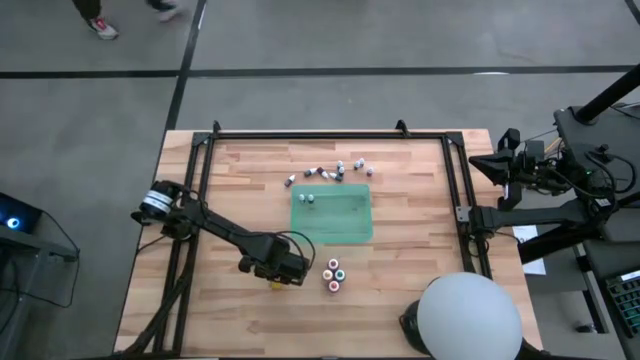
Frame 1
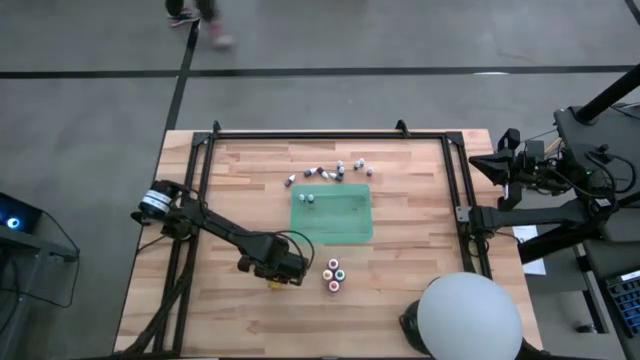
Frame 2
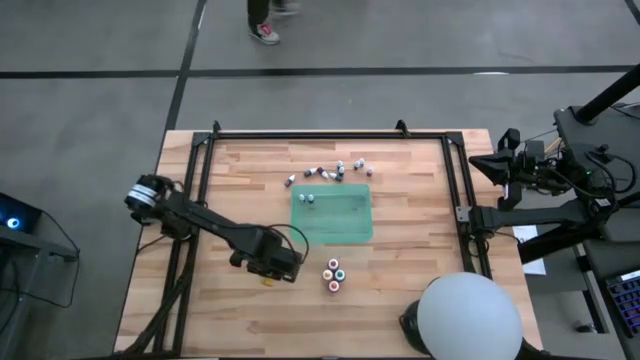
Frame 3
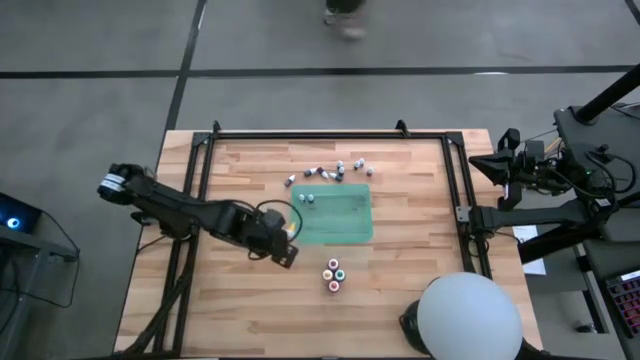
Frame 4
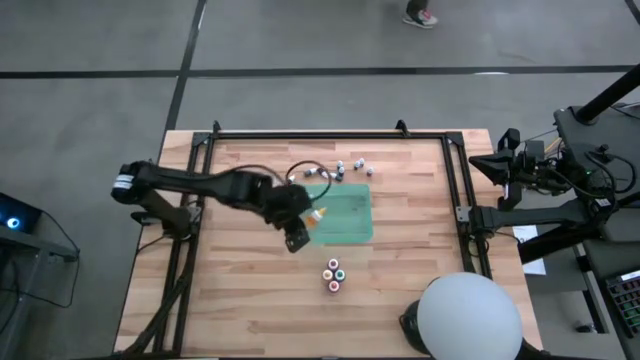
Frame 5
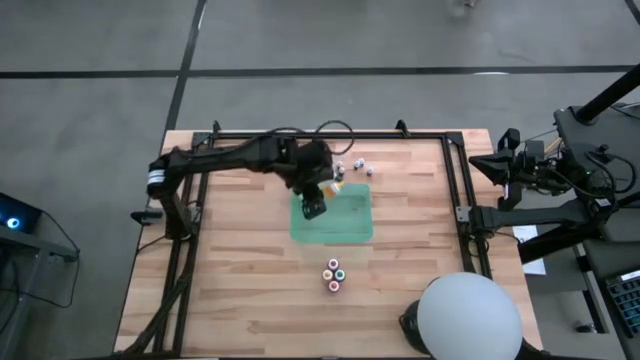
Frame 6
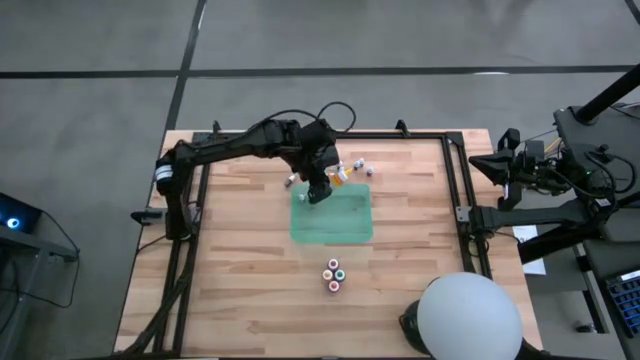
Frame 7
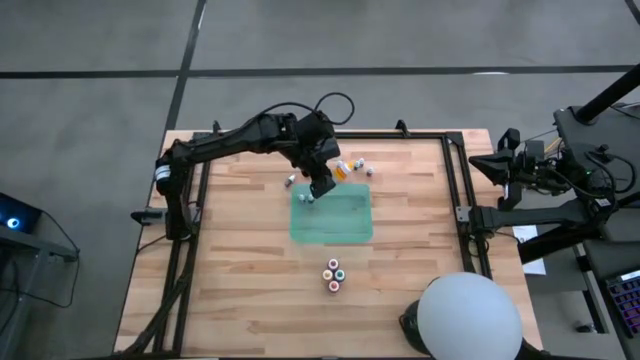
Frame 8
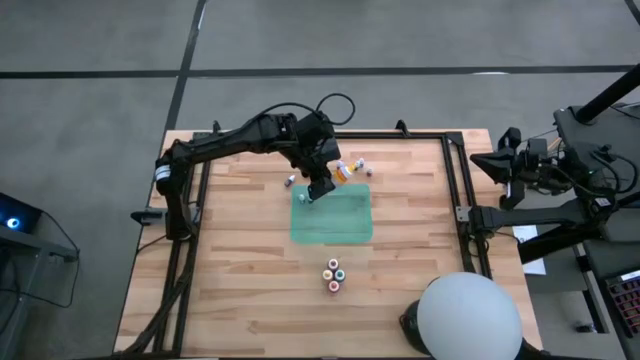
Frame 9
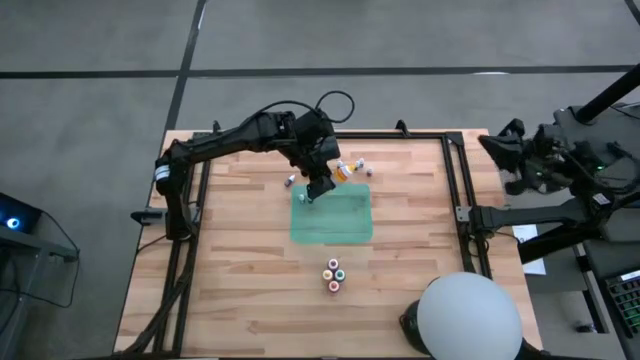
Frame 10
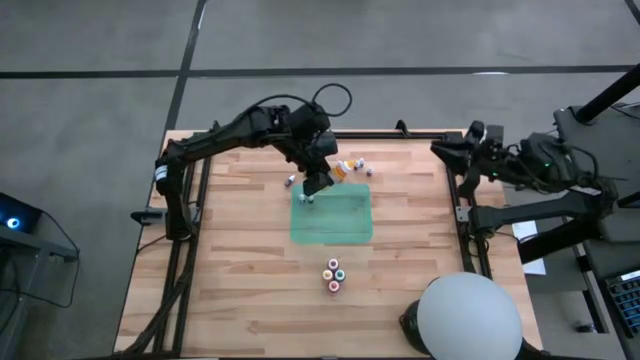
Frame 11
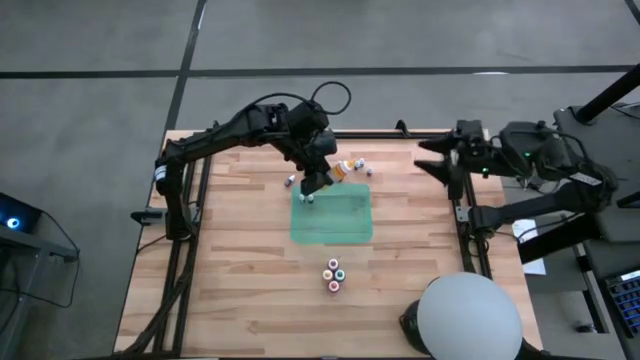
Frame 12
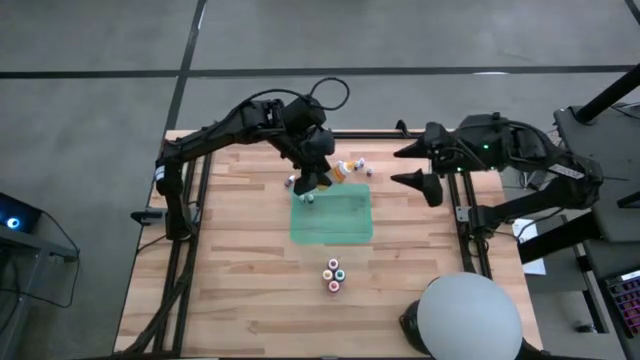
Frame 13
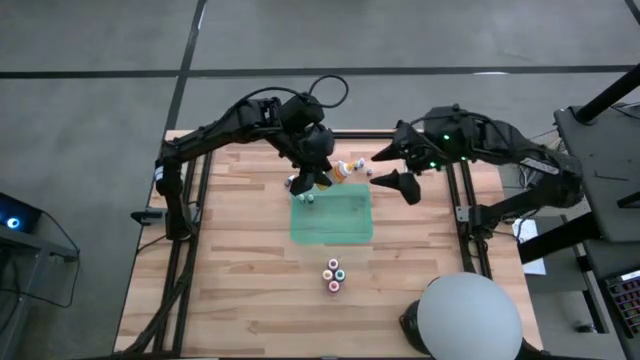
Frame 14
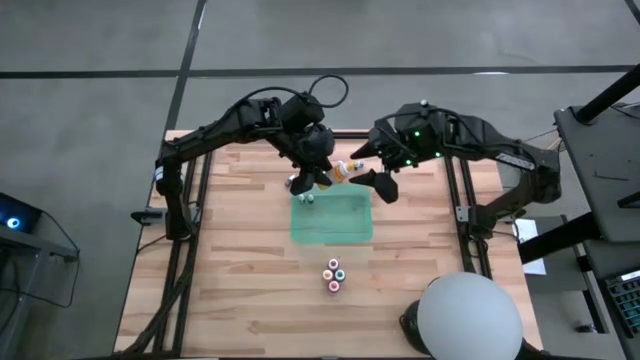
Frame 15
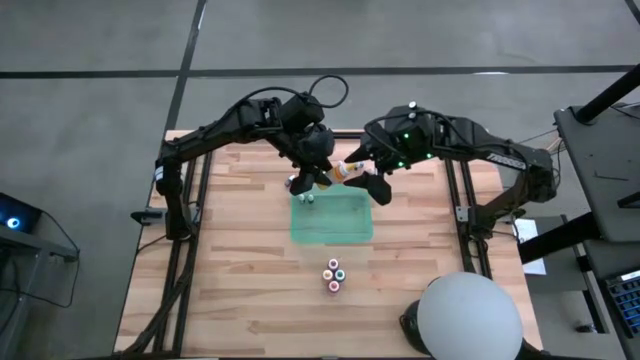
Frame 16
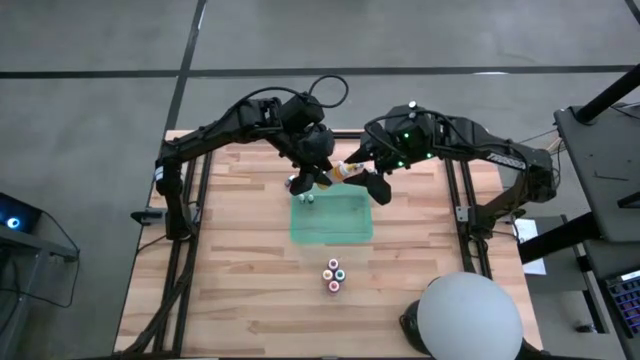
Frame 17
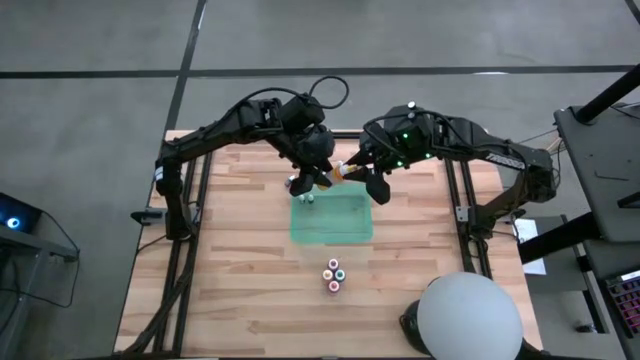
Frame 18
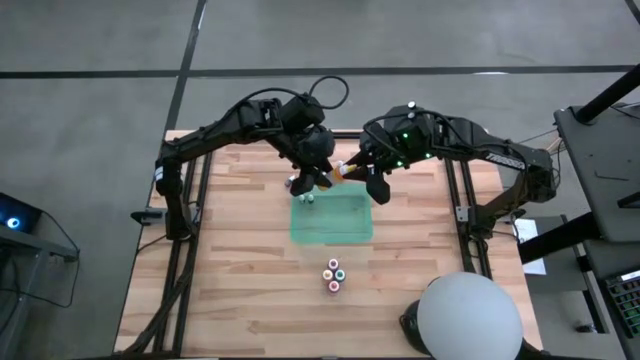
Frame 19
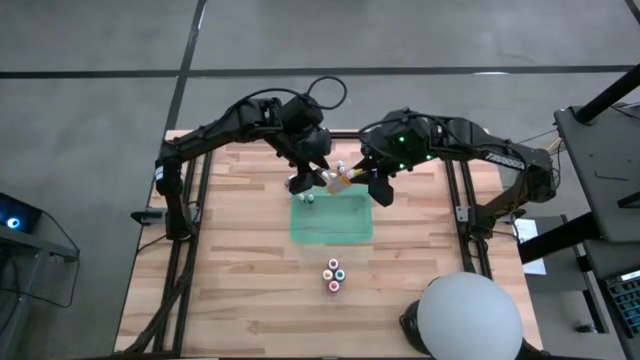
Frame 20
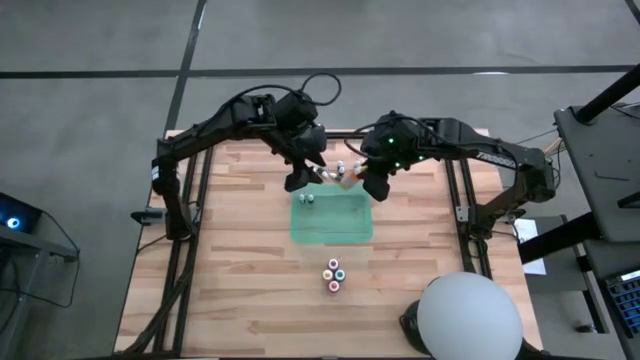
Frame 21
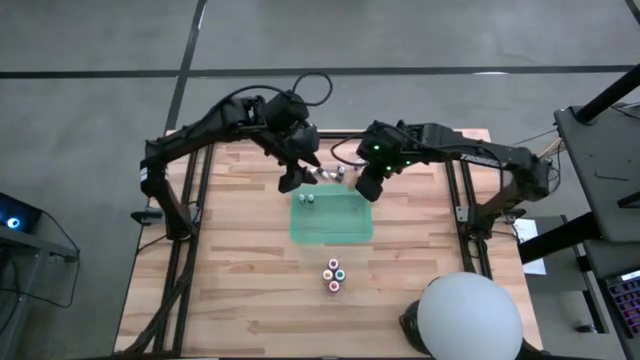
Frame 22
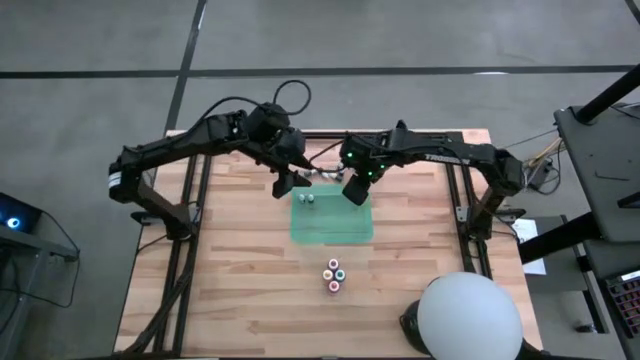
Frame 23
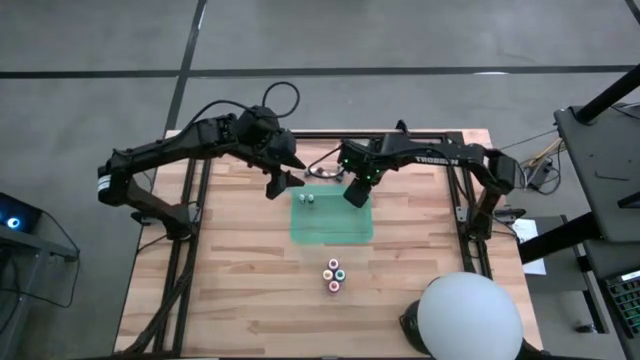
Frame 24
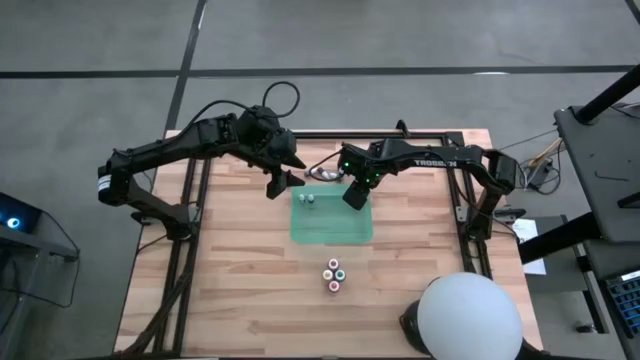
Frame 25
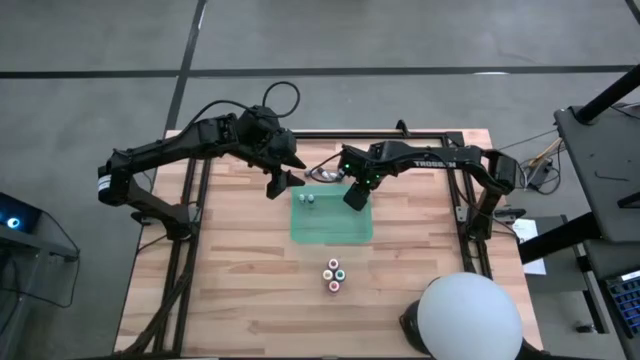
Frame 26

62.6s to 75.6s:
Task: Pick & Place food coloring
Put the big yellow food coloring bottle into the green container

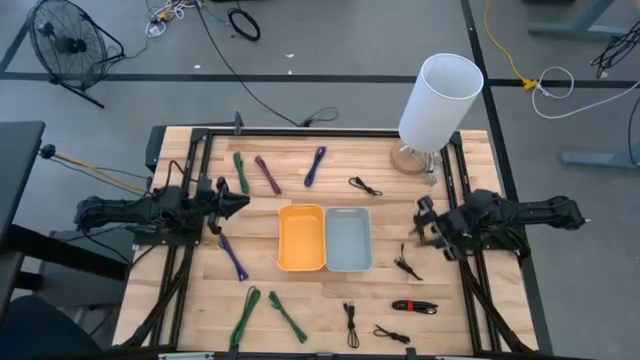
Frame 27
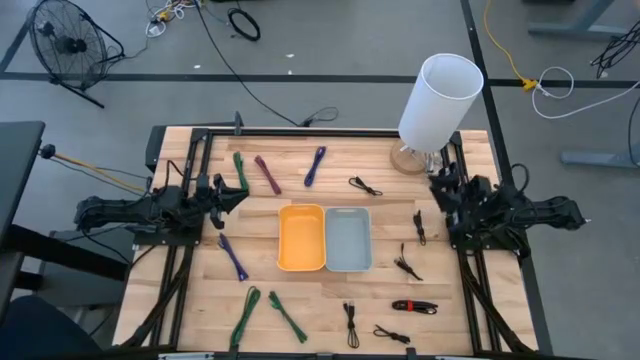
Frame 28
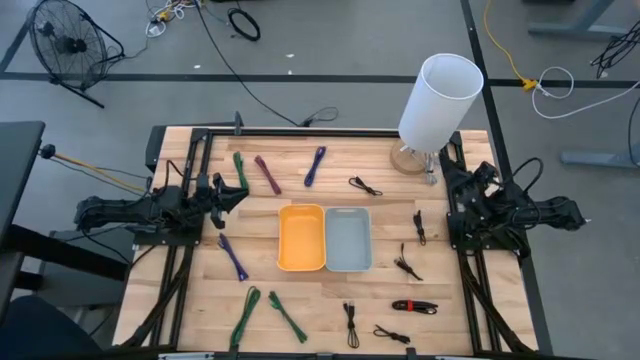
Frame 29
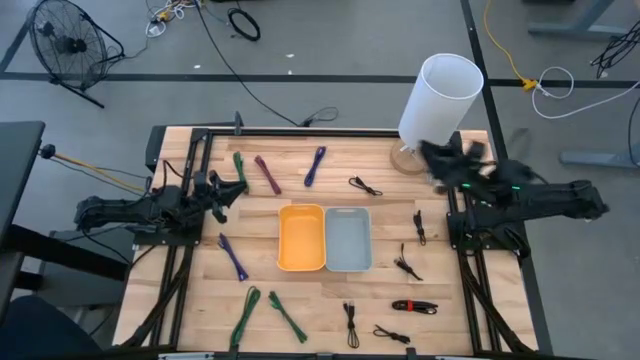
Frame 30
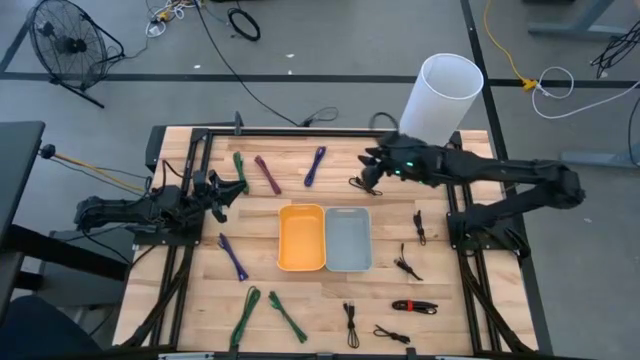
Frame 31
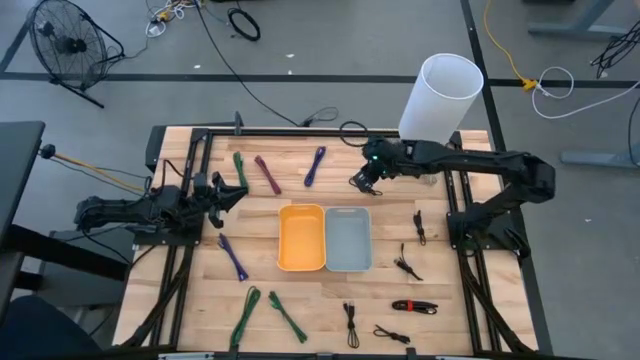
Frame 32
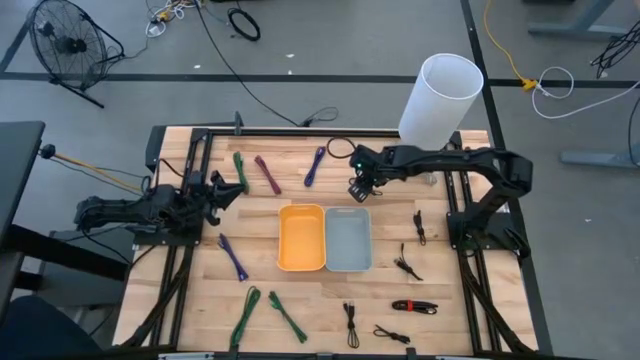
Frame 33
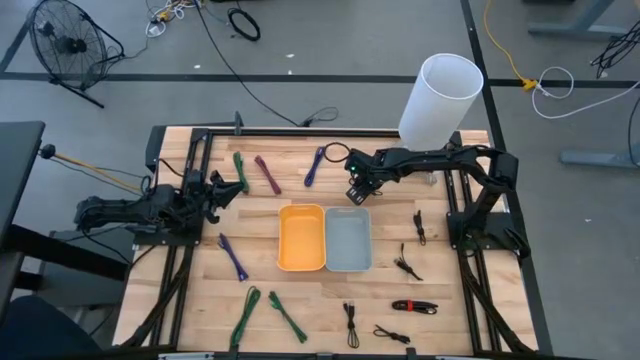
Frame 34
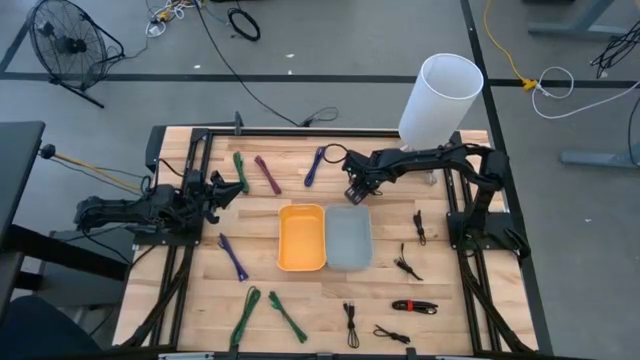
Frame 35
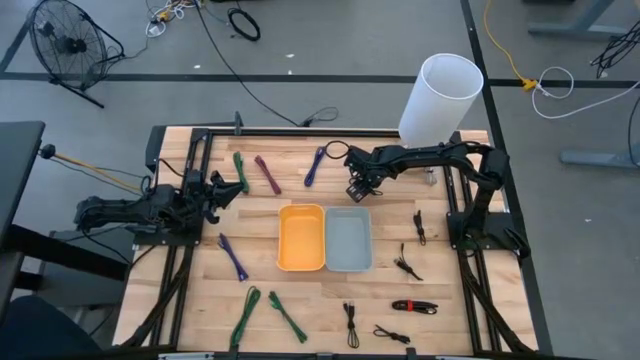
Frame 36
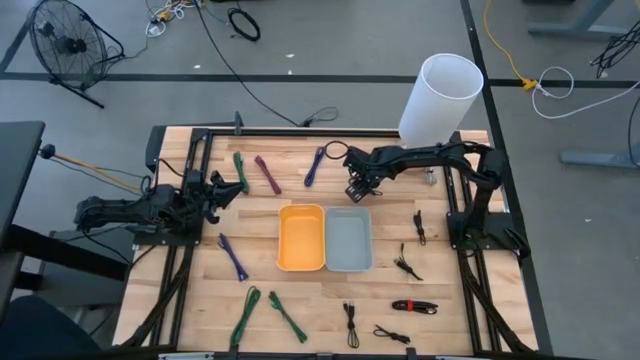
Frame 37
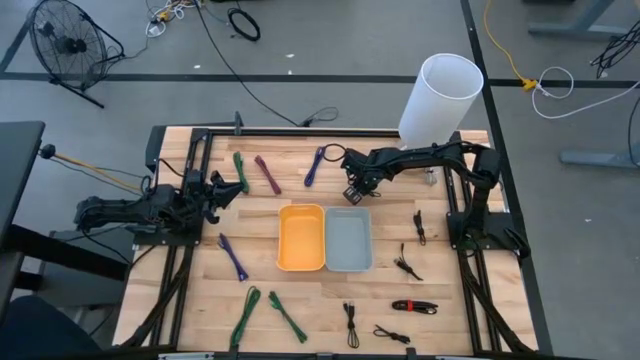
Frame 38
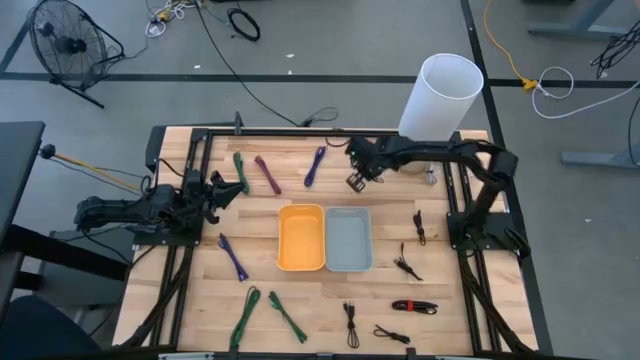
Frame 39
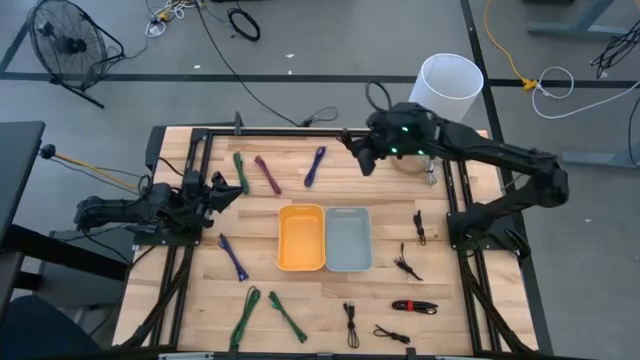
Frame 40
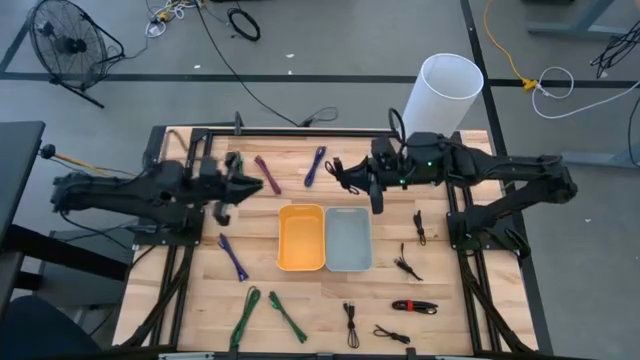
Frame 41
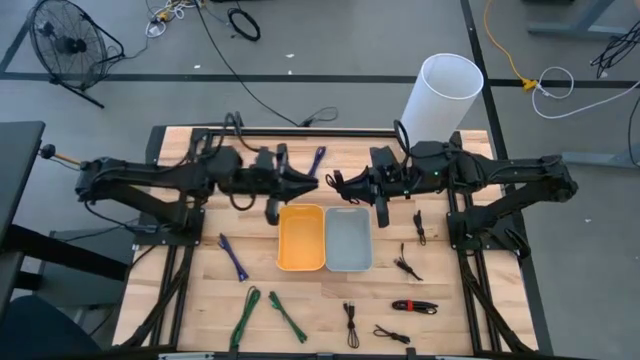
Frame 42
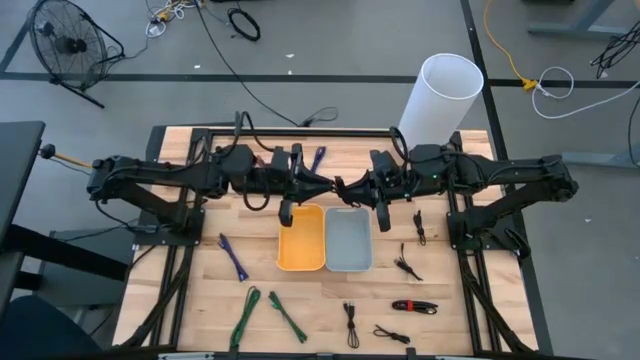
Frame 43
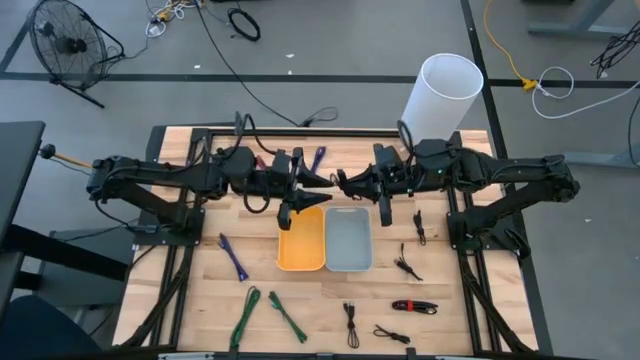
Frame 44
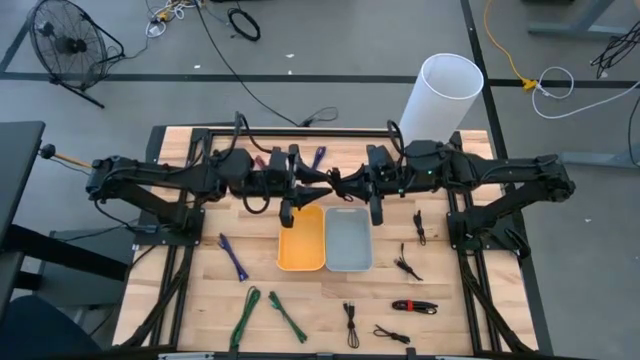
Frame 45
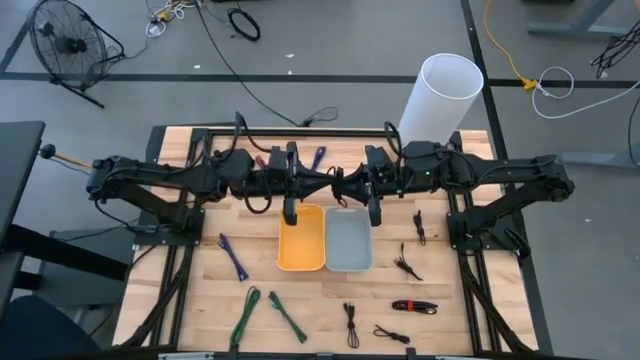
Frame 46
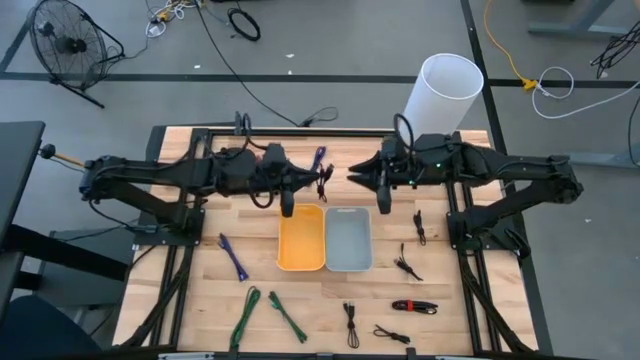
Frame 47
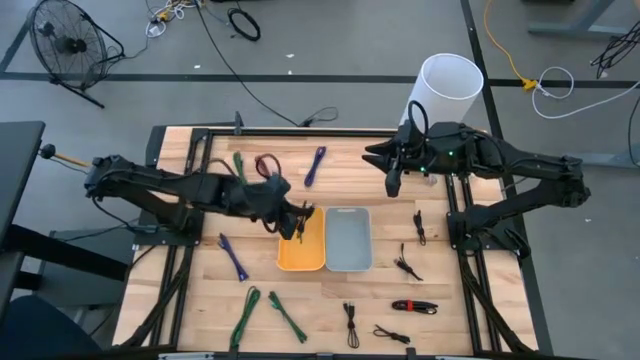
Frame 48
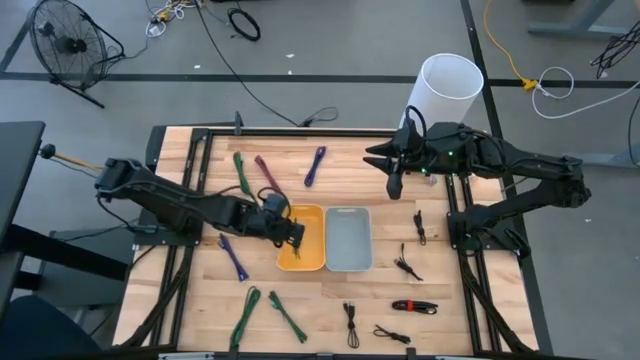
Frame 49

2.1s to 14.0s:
Task: Pick & Place USB Port
Put the black charger cable into the yellow bin
